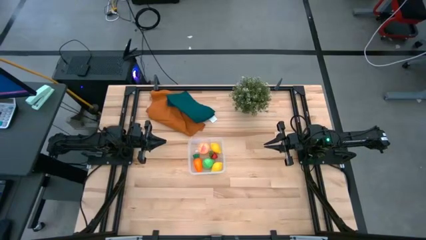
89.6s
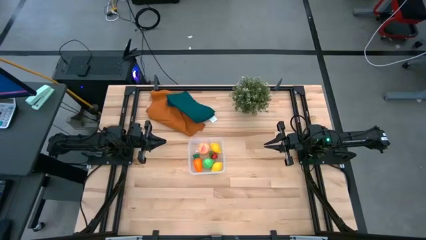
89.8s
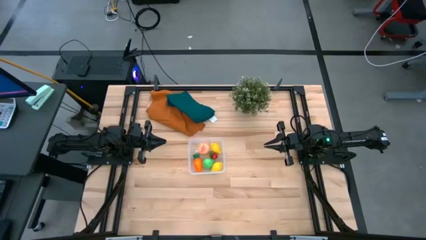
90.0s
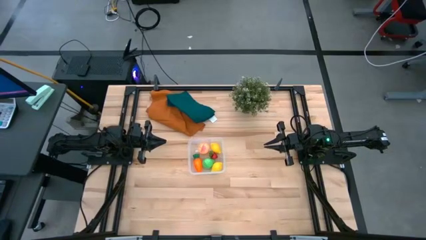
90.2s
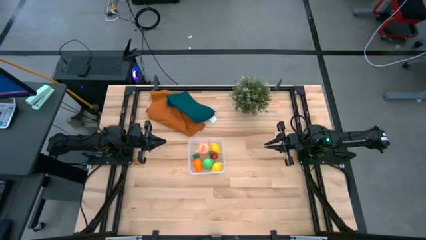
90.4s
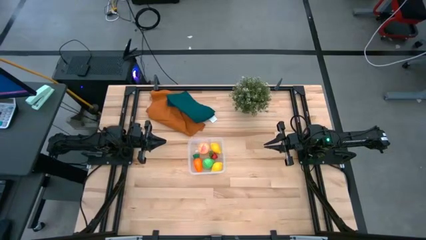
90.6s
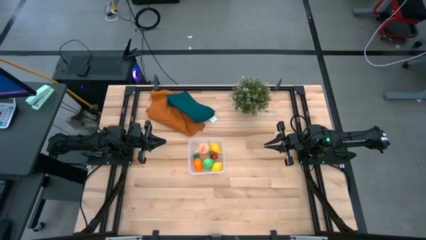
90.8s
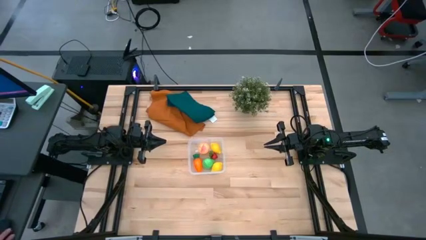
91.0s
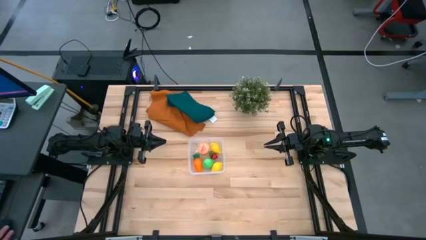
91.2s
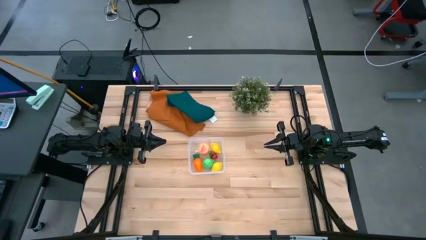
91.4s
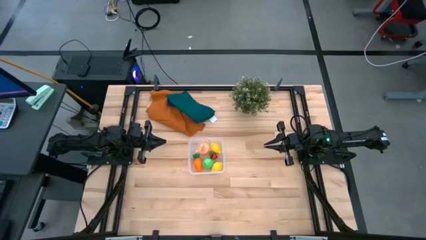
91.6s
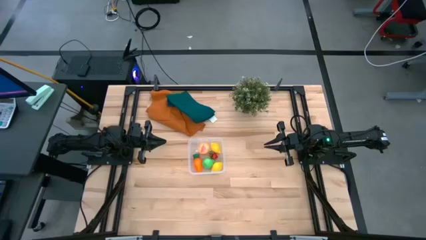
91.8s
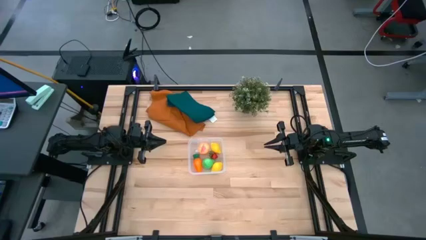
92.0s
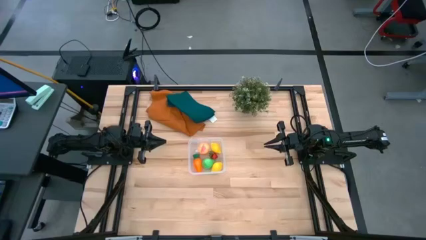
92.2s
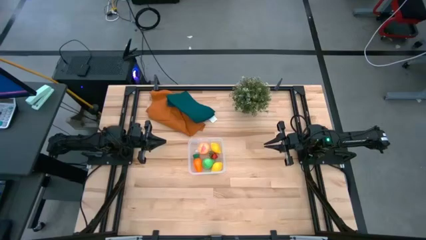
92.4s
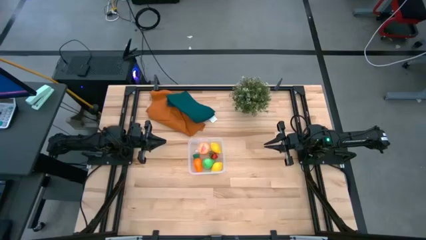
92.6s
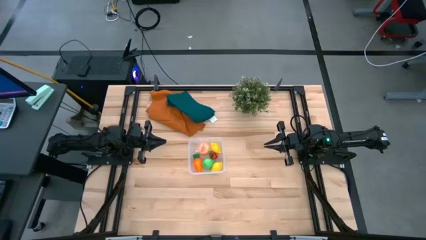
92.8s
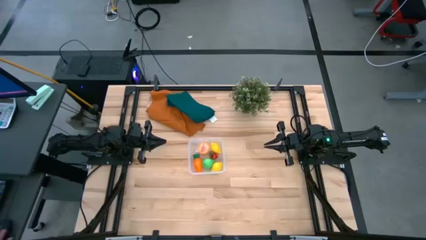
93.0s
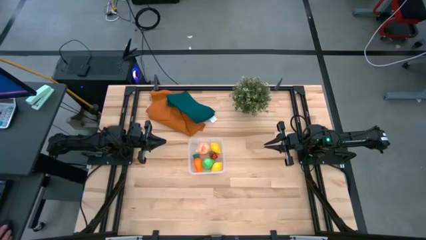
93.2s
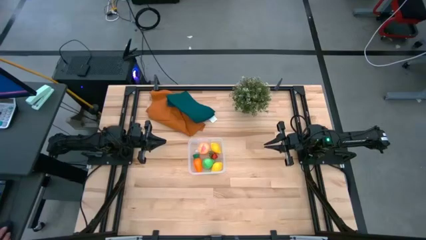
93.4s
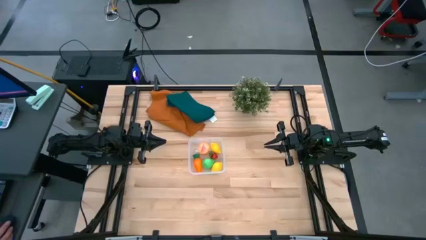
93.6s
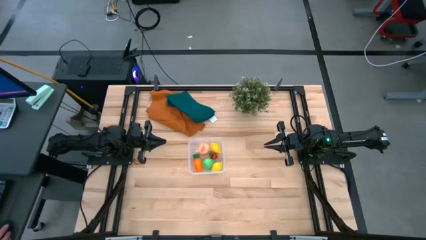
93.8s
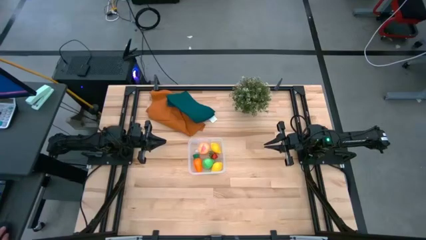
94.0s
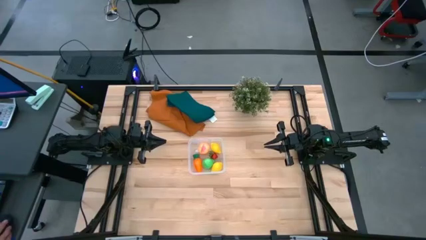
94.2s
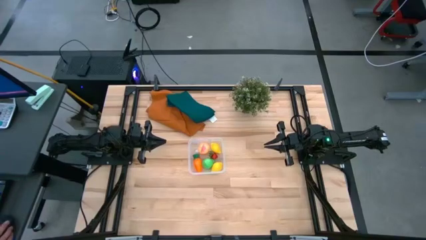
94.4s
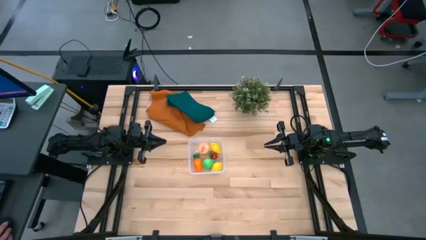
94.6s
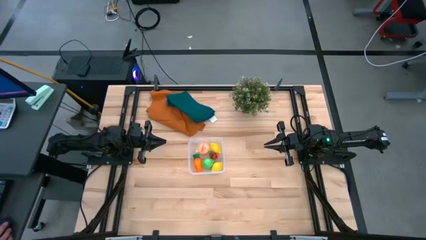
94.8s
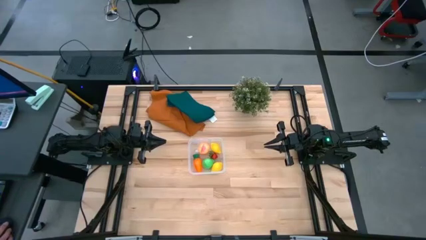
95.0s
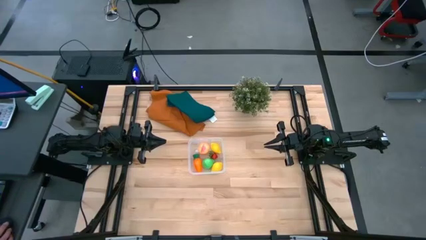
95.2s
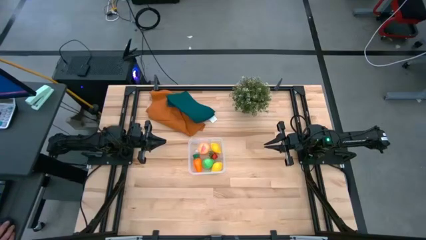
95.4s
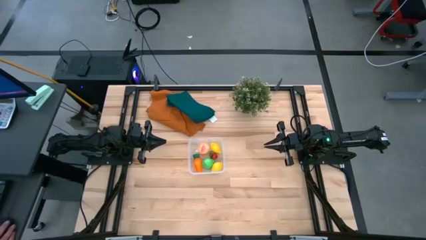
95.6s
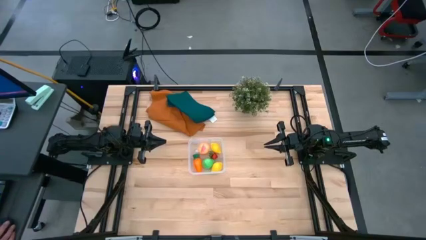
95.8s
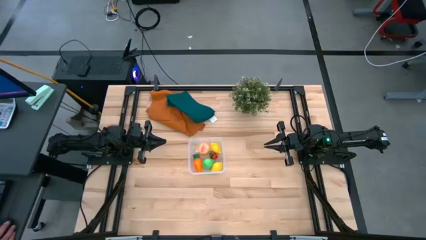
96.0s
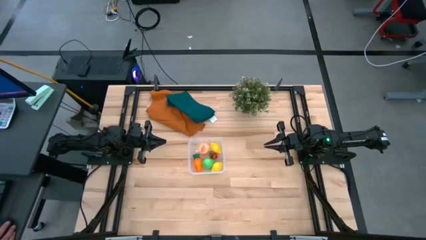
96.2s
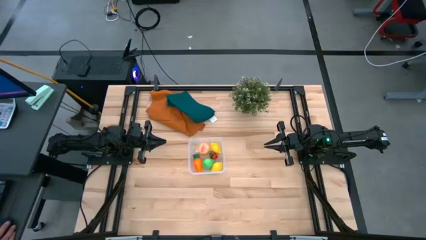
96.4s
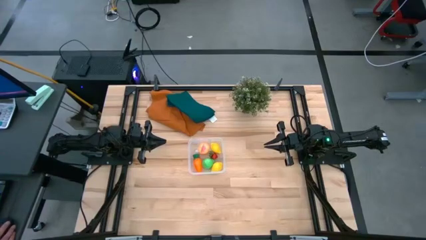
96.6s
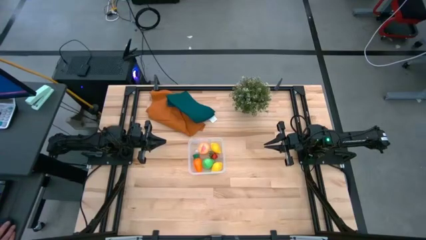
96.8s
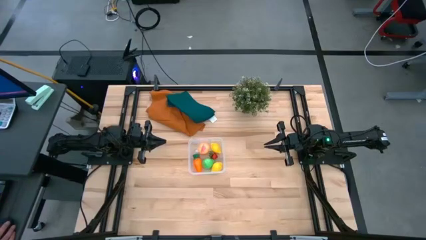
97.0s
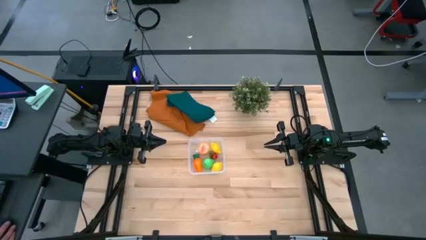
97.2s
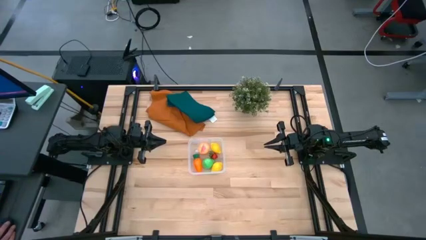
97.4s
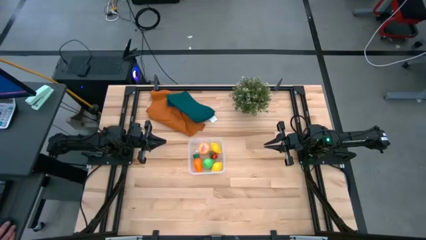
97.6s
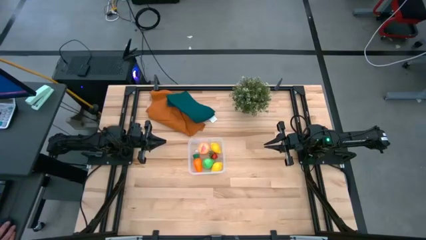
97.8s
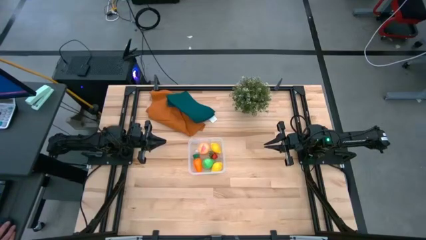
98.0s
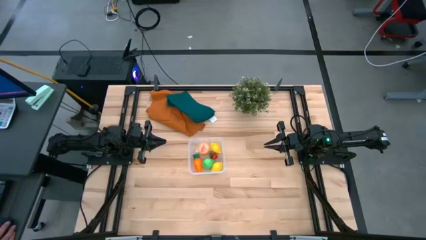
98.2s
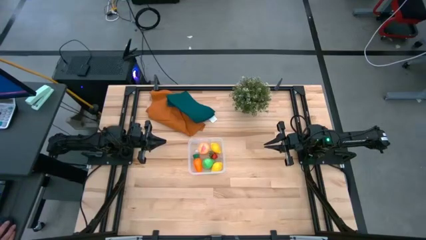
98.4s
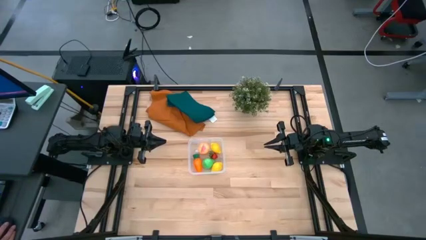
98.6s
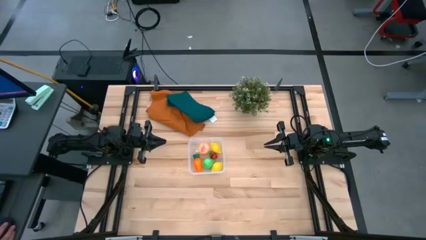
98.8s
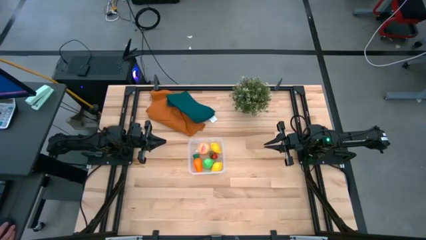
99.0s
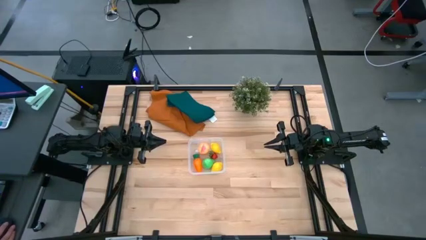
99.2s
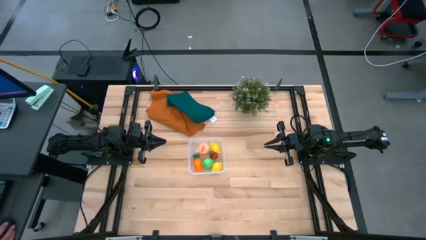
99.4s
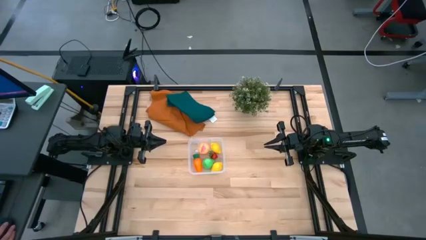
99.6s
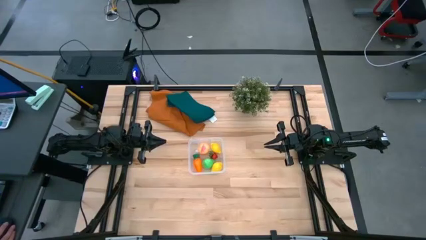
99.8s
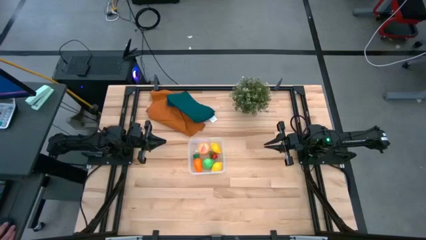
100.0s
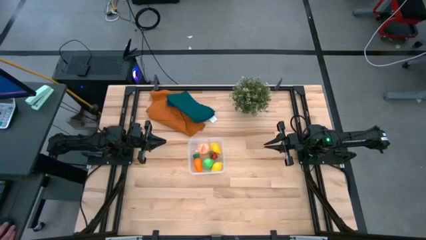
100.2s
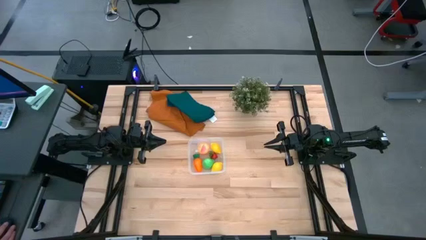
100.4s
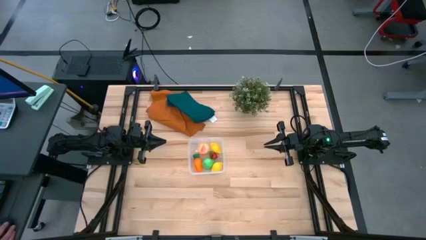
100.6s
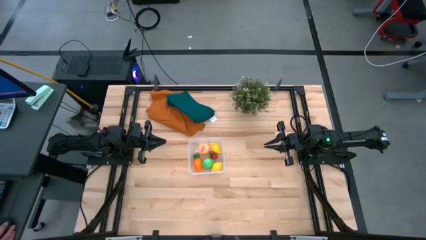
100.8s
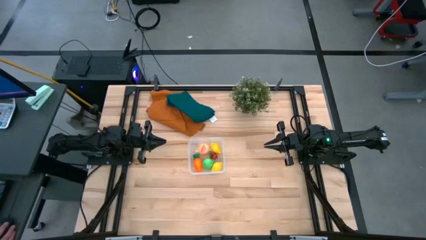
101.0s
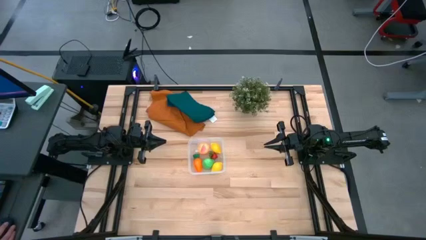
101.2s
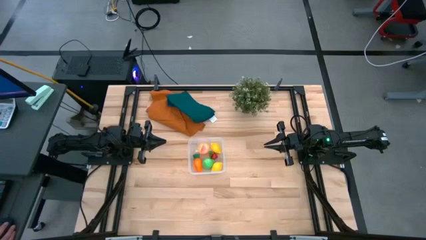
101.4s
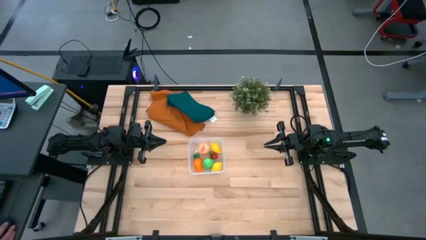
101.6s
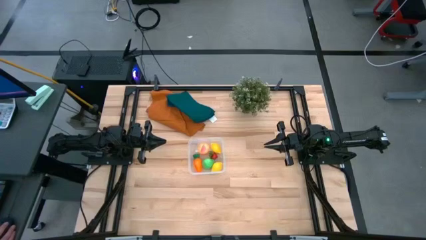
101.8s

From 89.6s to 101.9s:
Task: Pick and placing Produce into tupperware
Return to Home Position

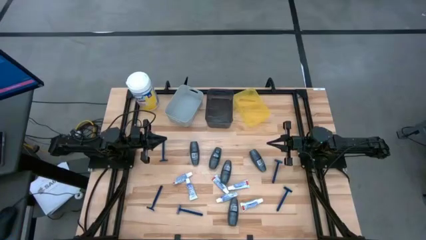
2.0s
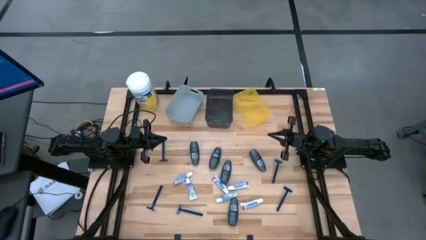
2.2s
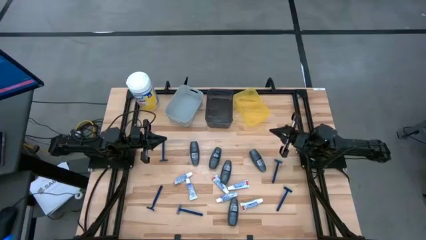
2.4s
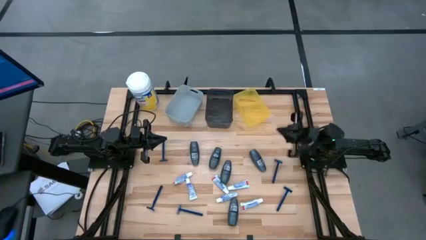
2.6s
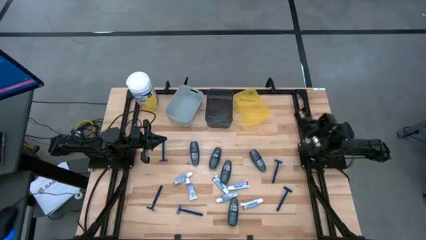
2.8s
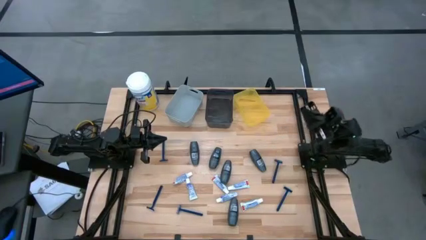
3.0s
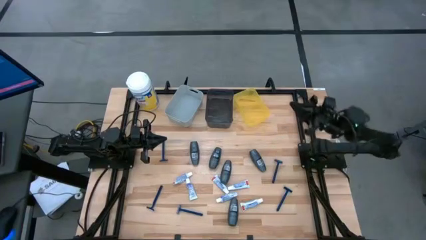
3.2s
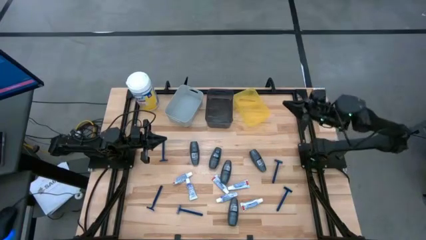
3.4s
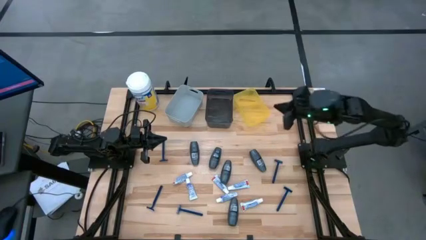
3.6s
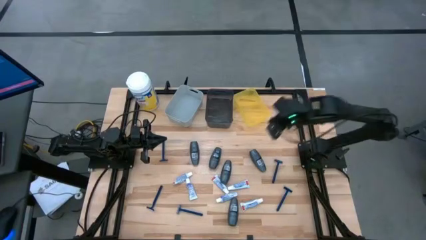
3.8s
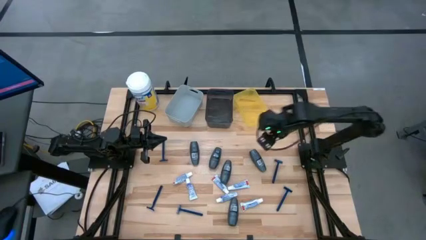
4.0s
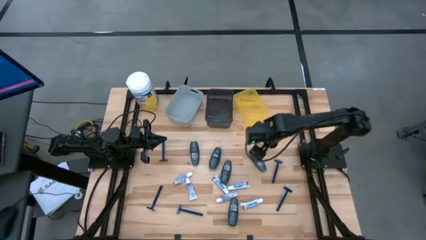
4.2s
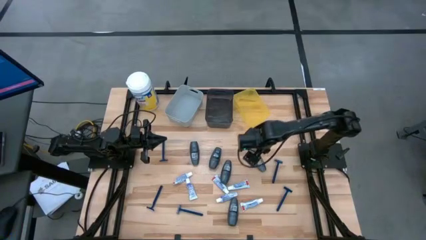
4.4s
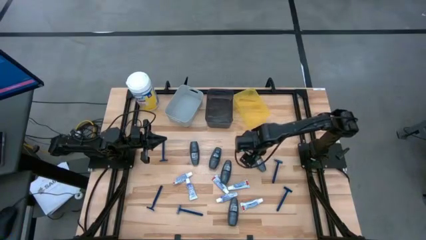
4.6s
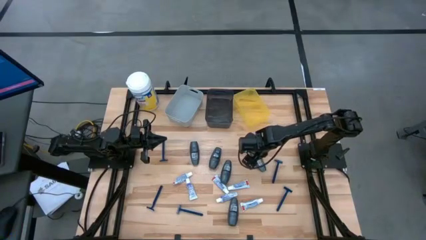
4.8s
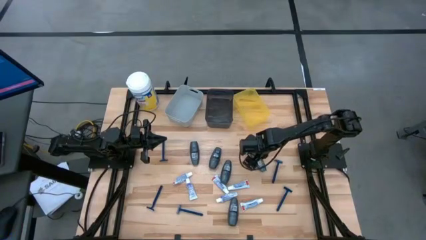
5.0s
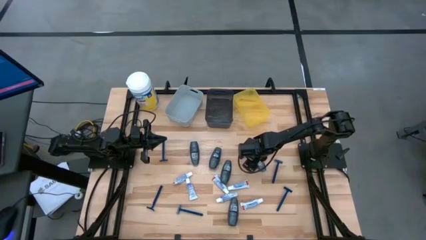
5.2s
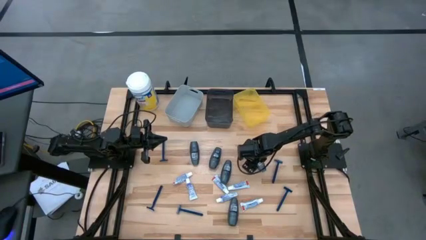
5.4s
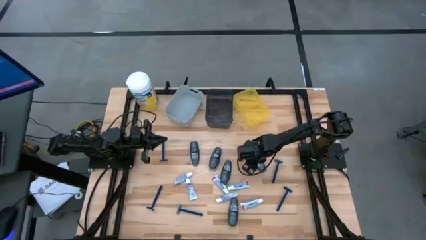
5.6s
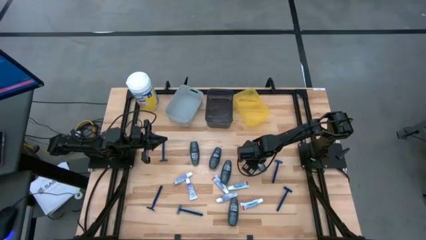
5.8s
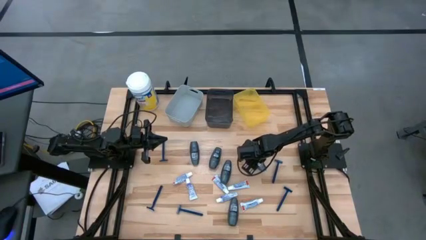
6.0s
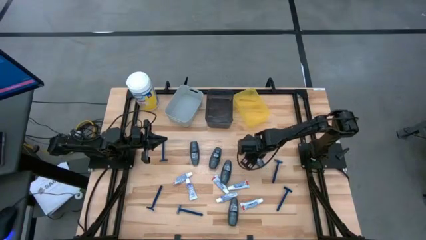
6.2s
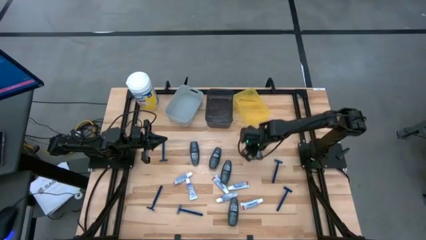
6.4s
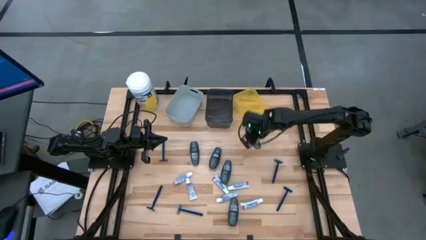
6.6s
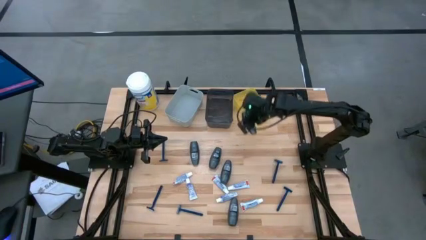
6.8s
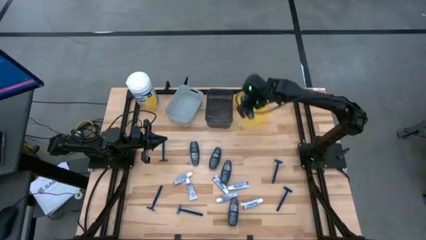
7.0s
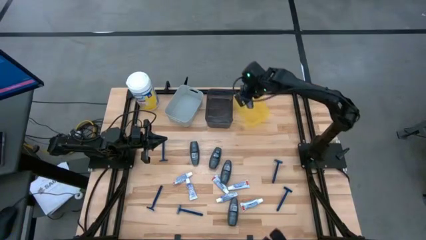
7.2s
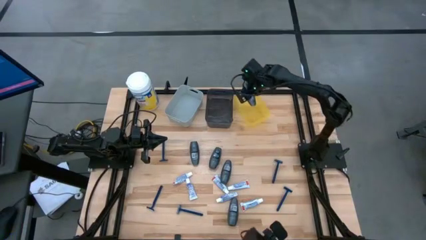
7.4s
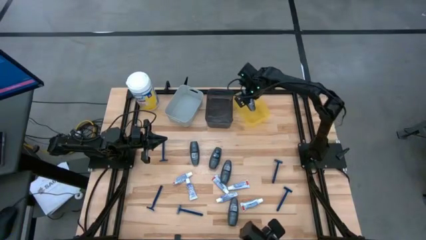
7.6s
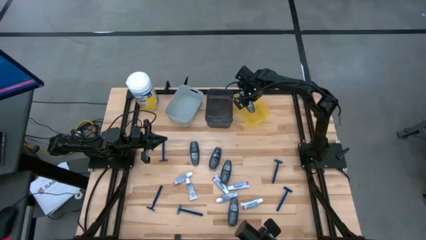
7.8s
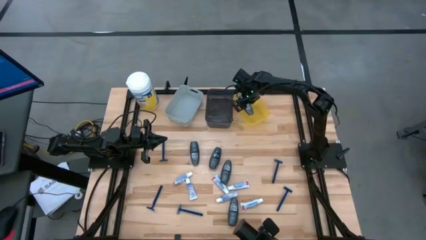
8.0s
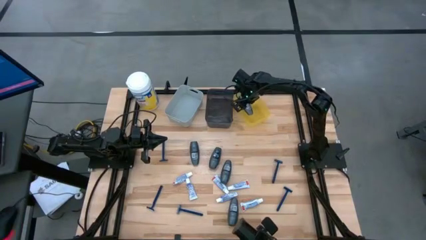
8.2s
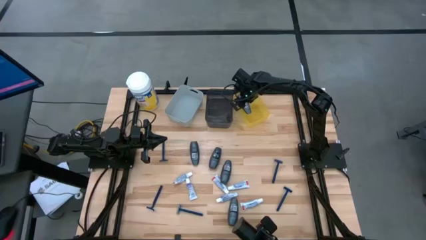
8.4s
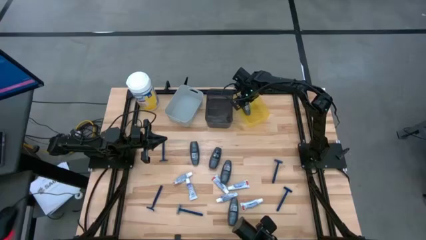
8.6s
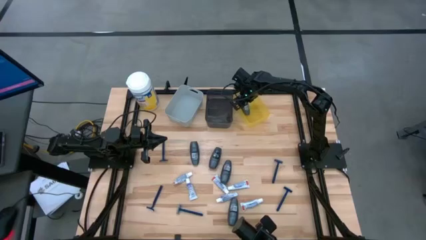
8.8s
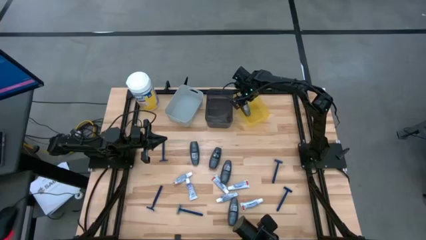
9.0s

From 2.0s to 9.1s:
Task: Pick & Place Travel size toiletries
Put the deodorant into the yellow bin
